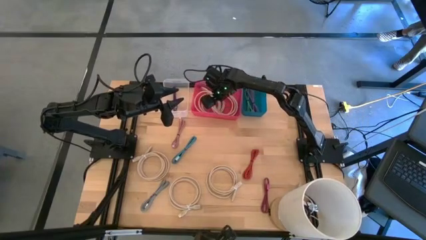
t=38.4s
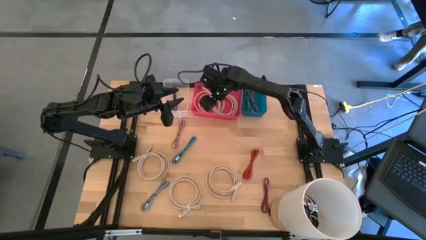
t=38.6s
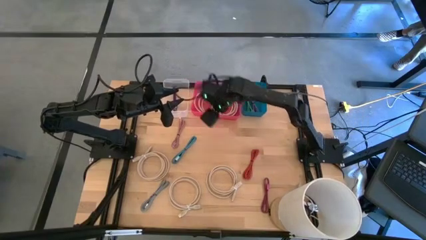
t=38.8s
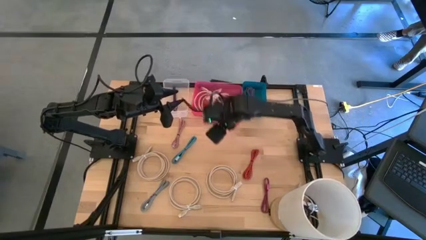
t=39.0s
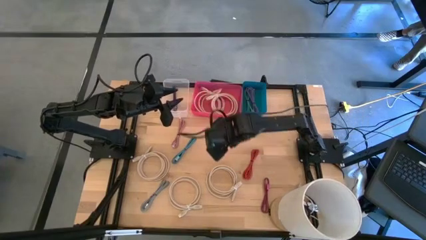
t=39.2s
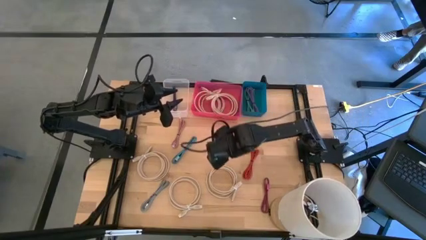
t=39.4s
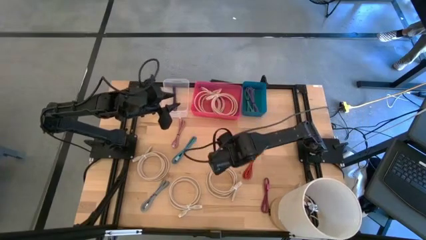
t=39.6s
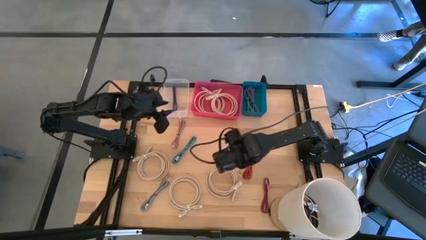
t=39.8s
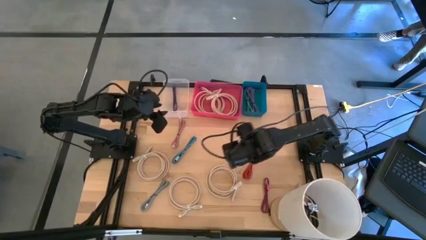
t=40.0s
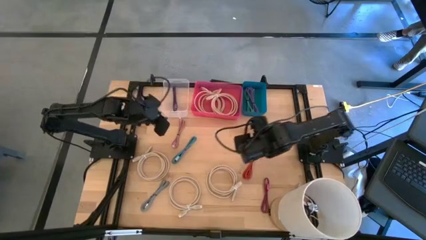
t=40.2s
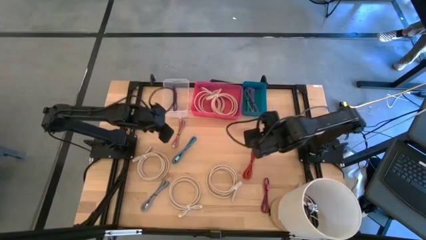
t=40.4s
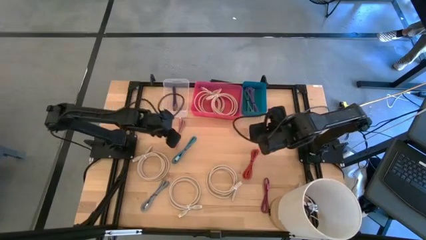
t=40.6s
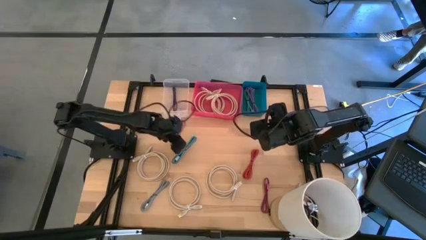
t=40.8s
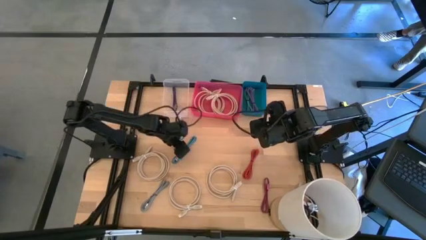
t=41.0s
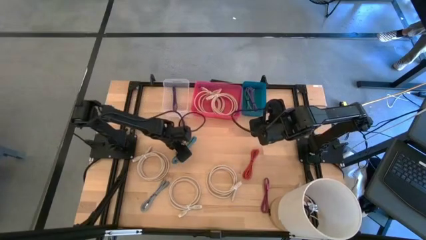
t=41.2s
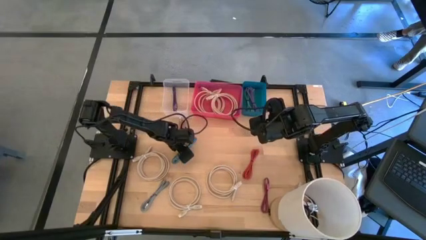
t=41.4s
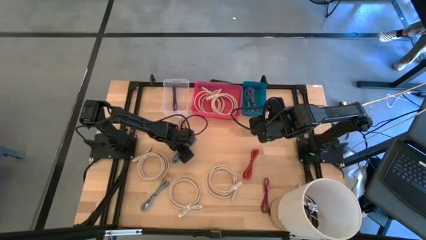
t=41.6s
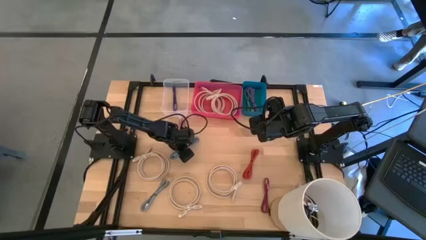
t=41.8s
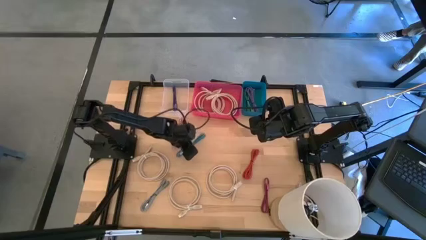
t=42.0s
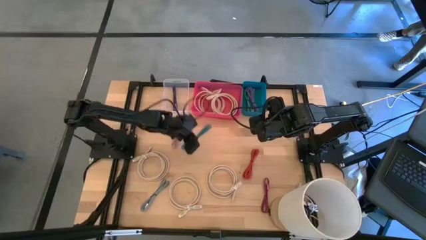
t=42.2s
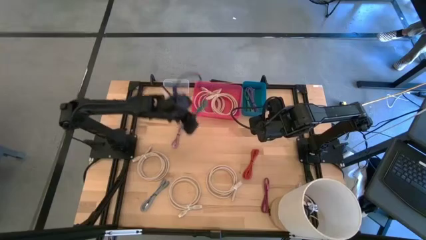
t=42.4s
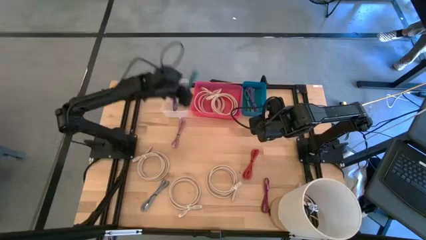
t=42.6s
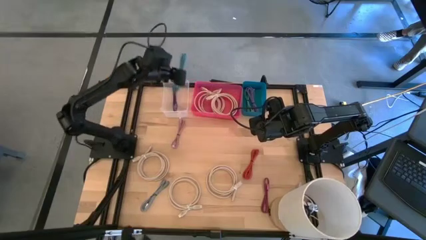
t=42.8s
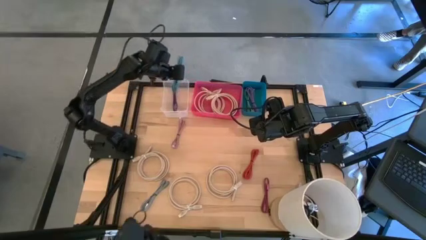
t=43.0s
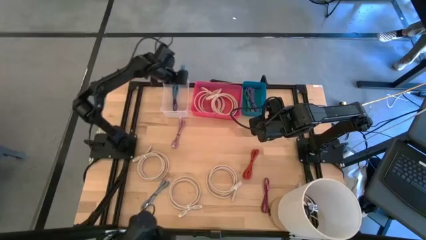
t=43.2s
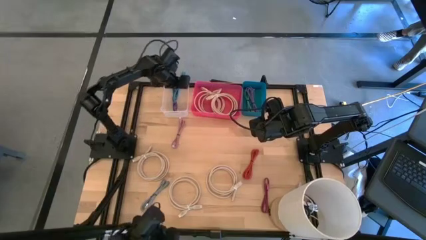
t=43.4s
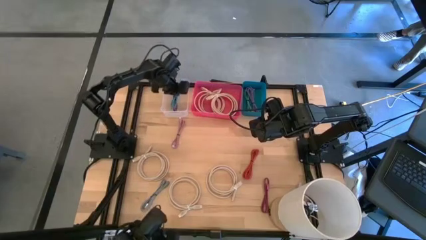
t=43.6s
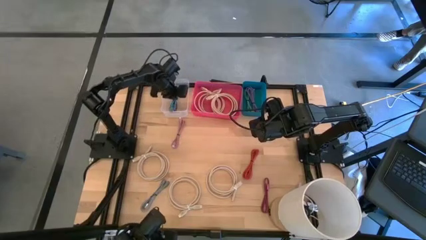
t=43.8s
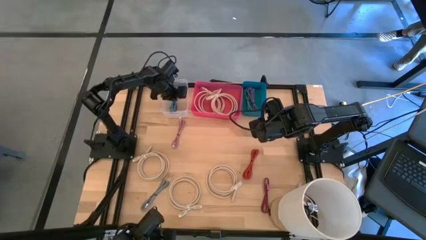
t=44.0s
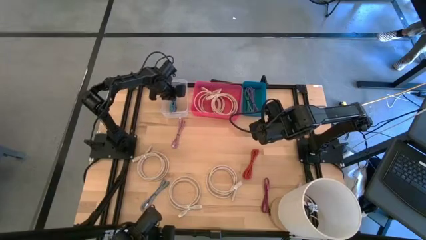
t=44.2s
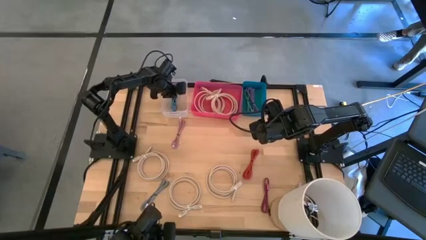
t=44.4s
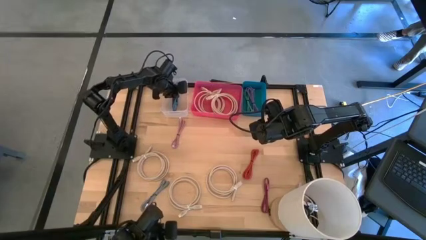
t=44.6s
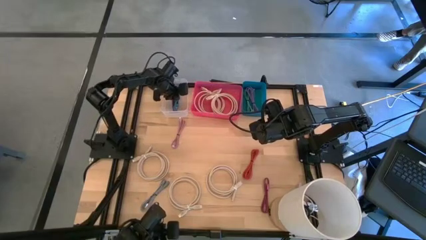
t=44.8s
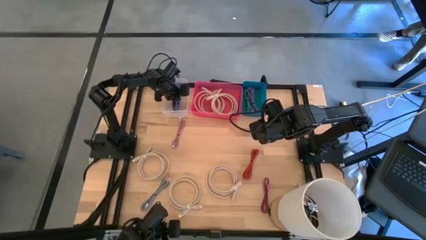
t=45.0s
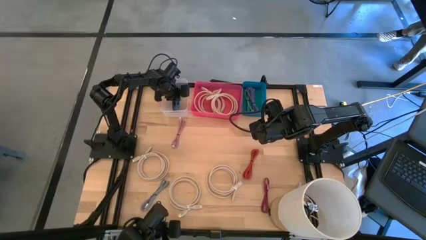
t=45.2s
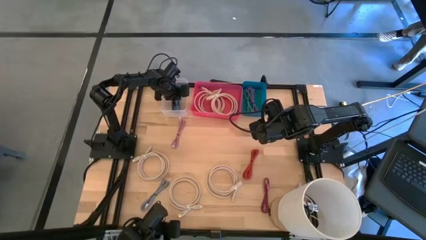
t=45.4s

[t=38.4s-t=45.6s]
Task: Pick & Place USB Port
Put the blue and black charger cable into the transparent bin

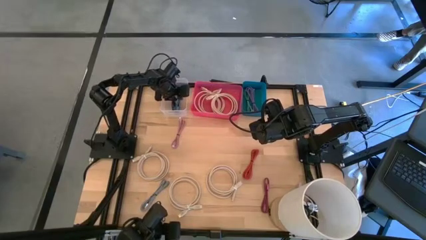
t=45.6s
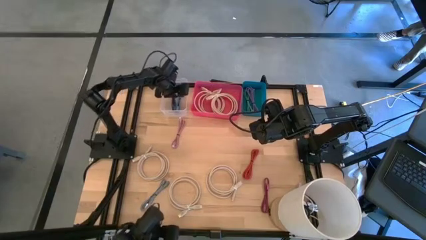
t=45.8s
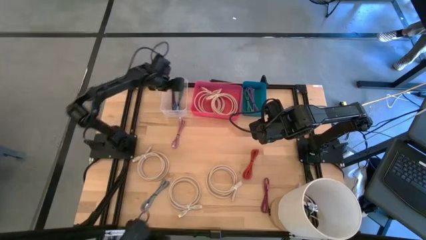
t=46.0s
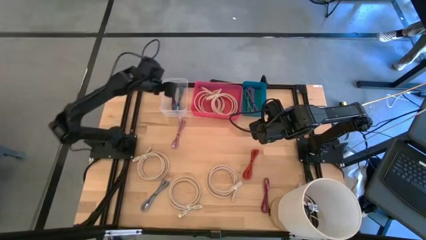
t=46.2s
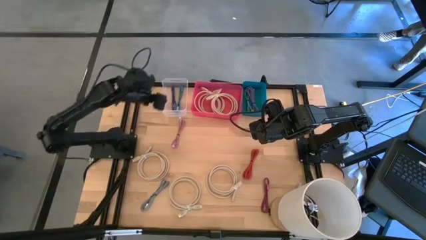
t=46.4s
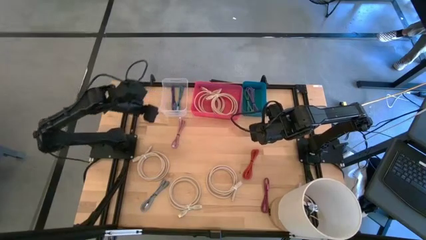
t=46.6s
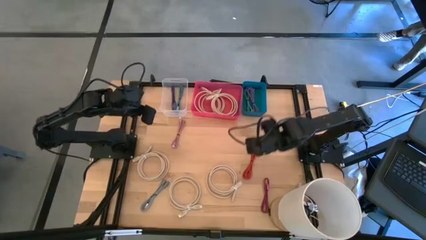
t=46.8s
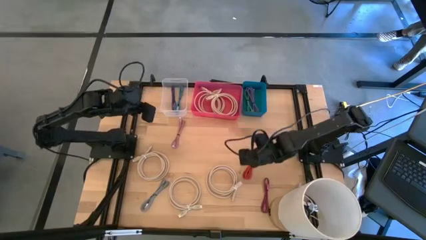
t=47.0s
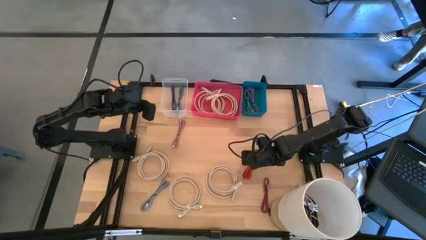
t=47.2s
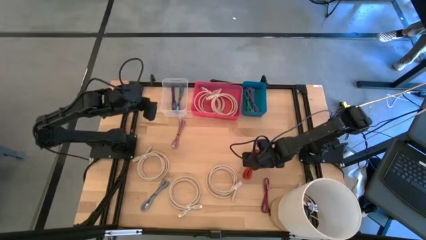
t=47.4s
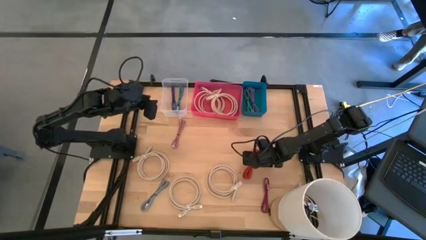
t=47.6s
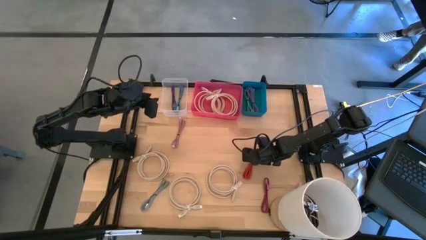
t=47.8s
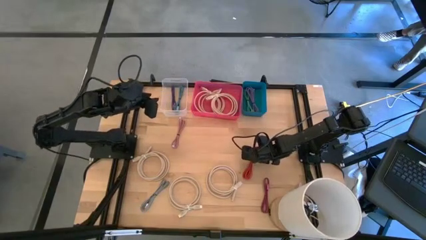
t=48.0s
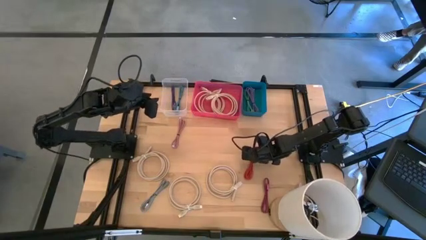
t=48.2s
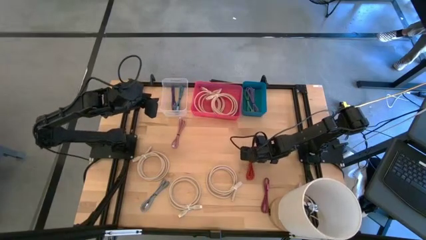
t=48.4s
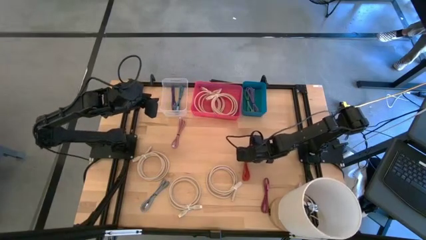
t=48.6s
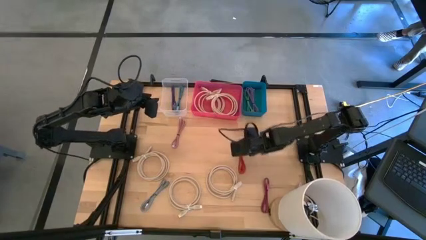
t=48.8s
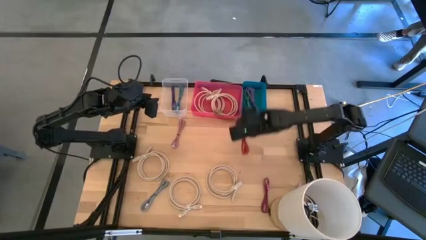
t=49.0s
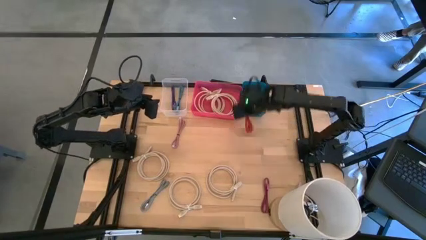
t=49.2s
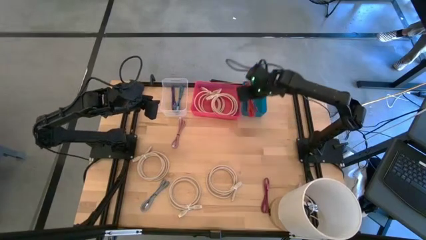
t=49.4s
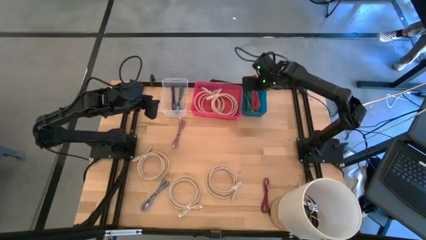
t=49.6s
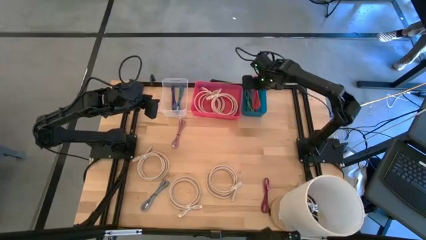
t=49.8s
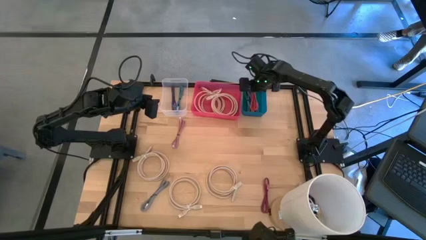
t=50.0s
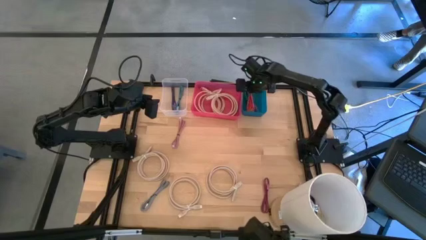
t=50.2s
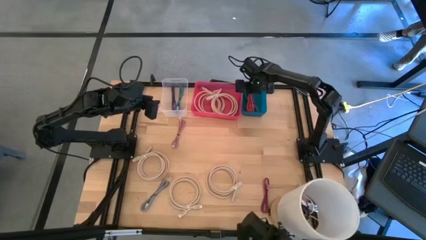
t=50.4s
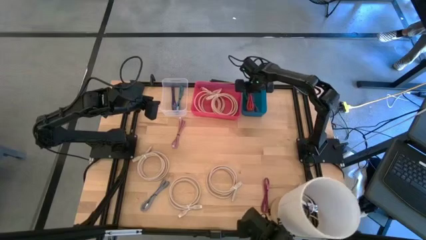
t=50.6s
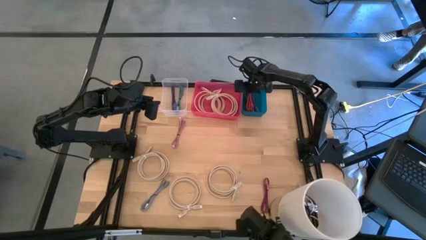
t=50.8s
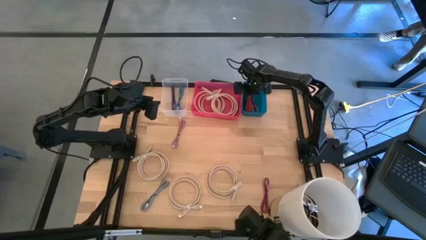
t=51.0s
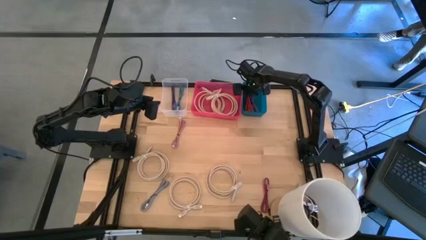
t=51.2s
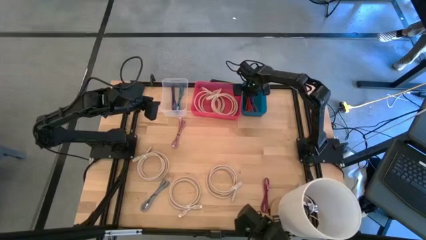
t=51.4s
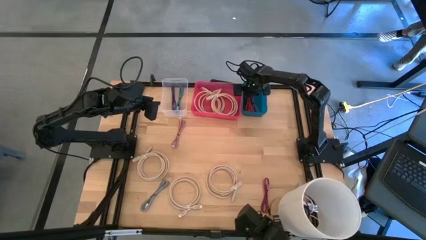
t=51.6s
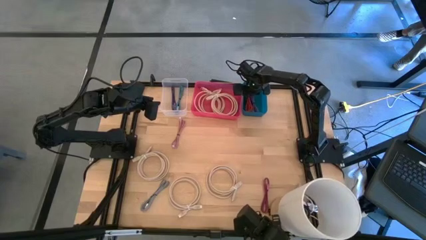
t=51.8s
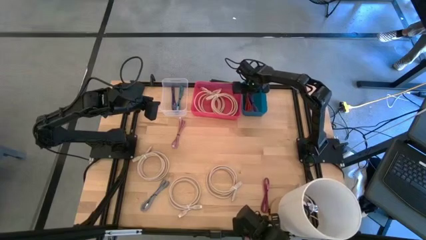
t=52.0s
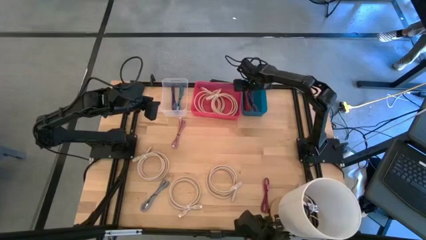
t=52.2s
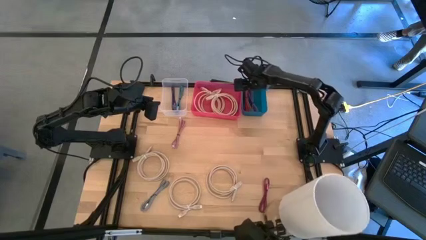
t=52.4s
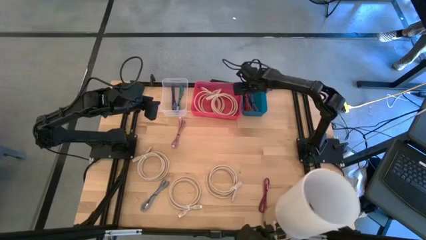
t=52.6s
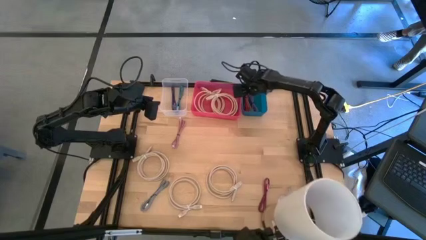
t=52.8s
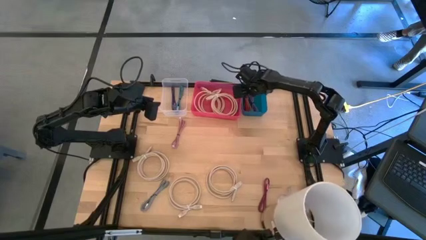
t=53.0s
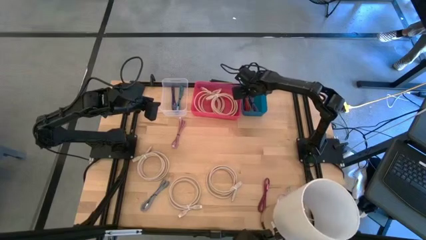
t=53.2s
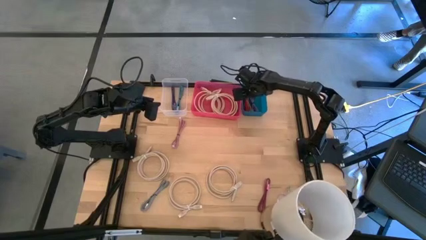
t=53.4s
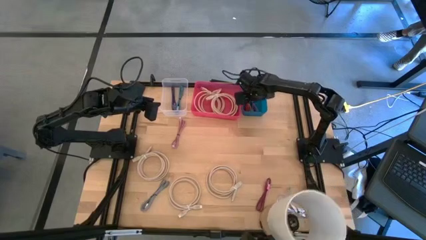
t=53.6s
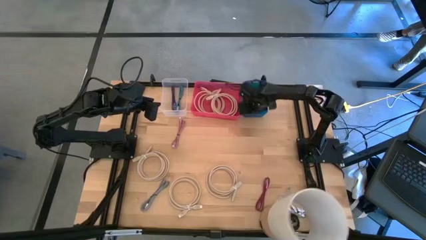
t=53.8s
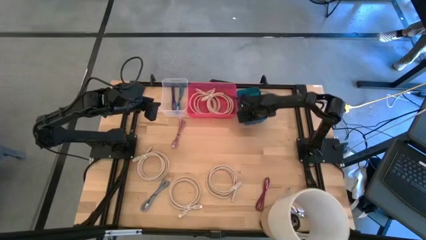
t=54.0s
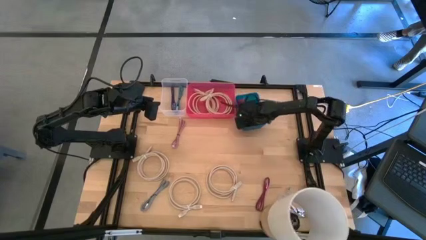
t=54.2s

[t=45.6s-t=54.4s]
Put the orange charger cable into the blue bin
